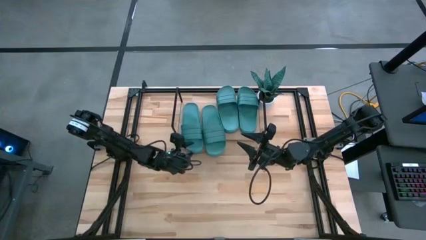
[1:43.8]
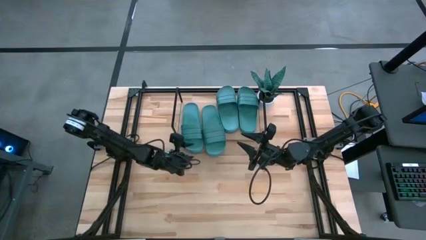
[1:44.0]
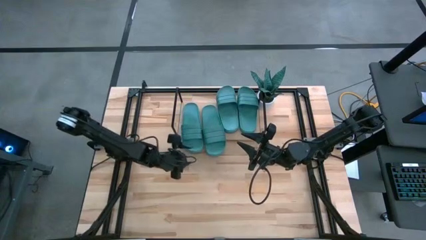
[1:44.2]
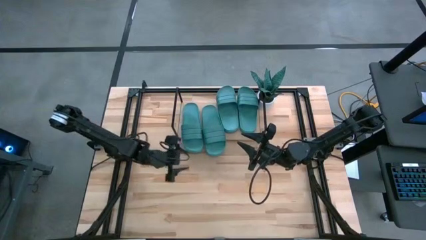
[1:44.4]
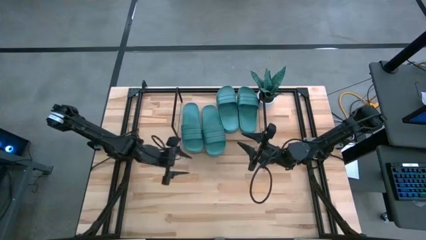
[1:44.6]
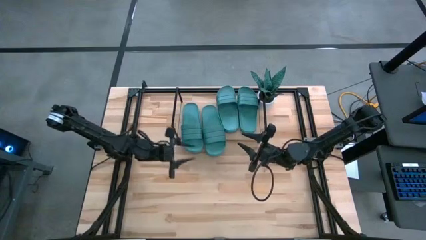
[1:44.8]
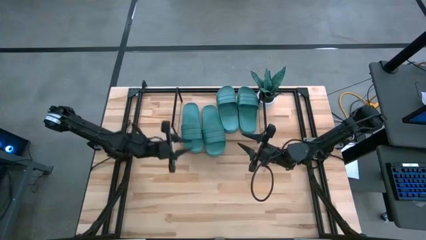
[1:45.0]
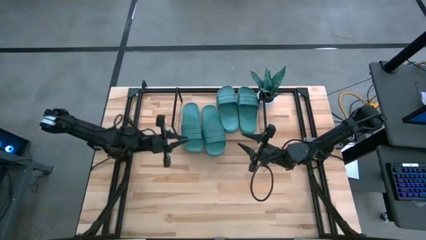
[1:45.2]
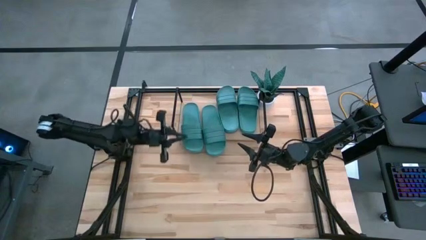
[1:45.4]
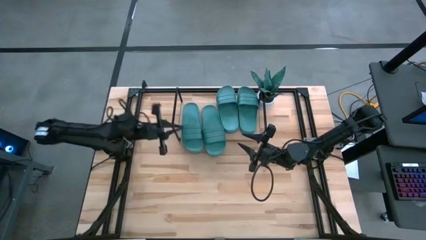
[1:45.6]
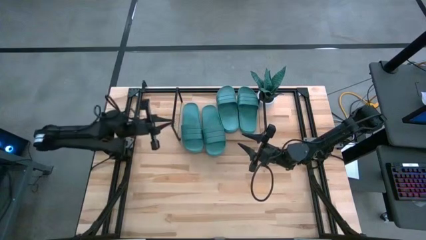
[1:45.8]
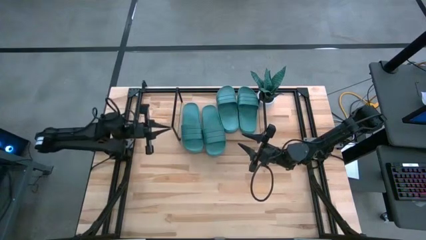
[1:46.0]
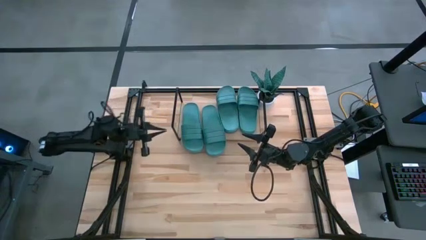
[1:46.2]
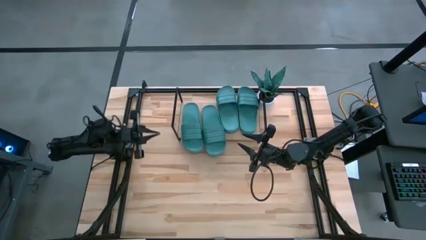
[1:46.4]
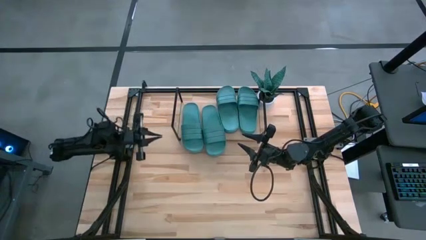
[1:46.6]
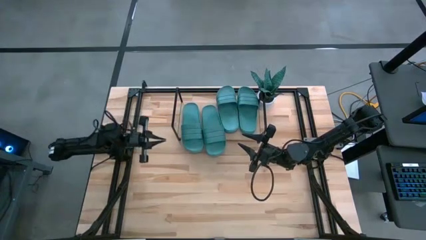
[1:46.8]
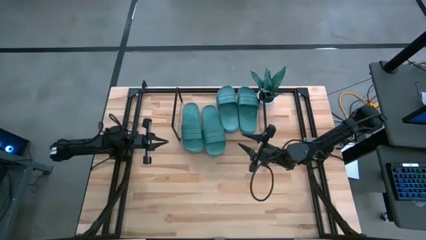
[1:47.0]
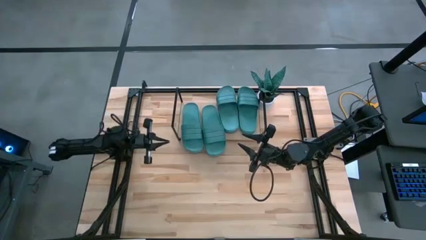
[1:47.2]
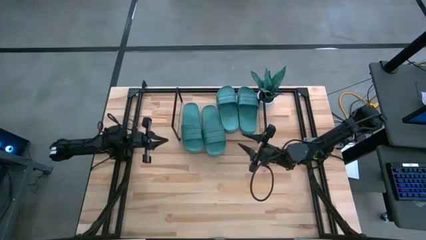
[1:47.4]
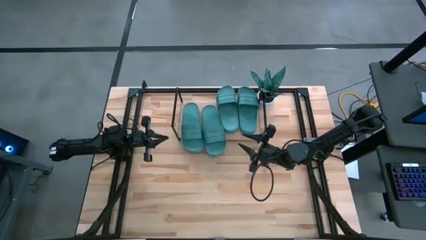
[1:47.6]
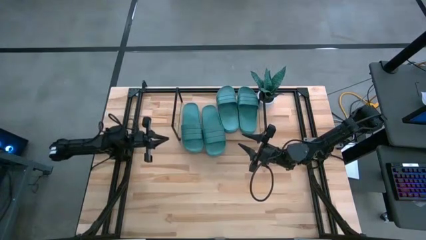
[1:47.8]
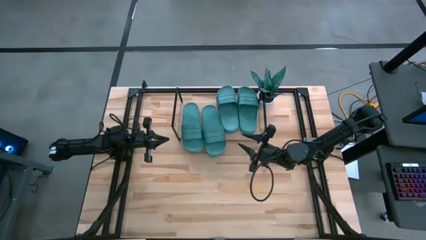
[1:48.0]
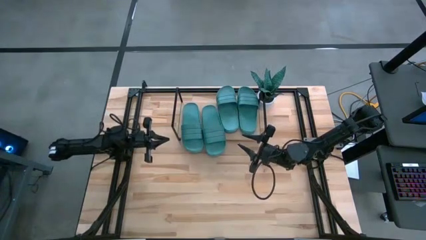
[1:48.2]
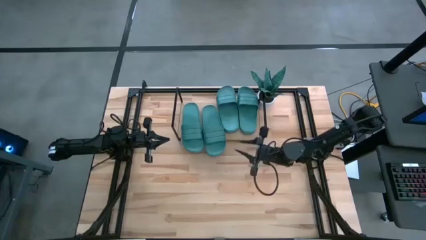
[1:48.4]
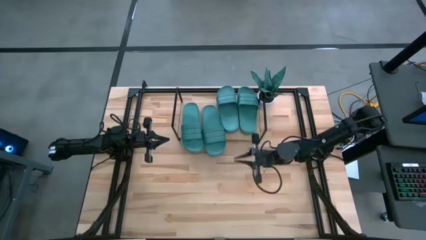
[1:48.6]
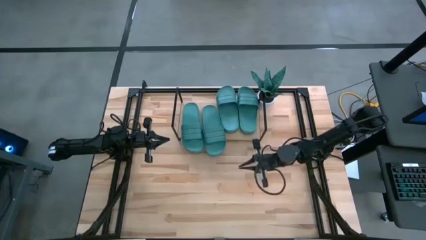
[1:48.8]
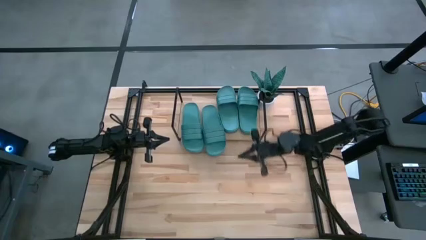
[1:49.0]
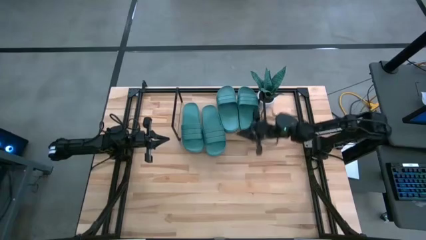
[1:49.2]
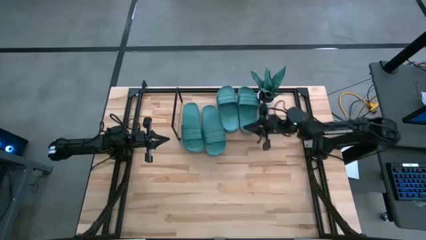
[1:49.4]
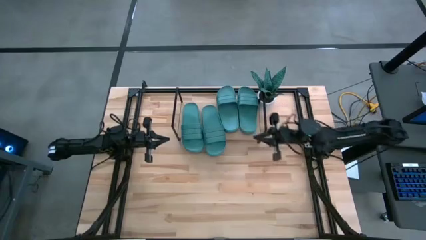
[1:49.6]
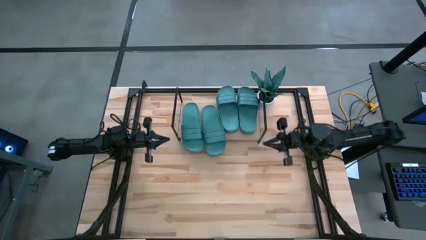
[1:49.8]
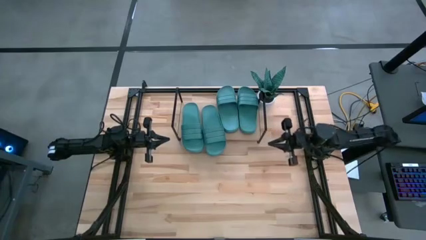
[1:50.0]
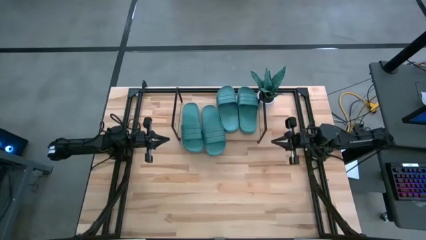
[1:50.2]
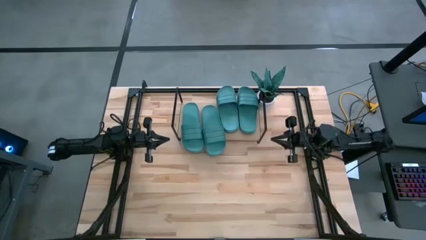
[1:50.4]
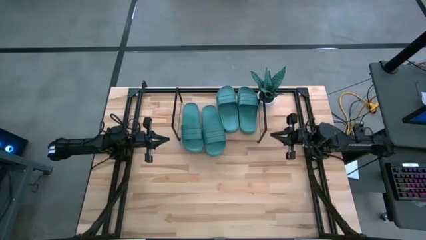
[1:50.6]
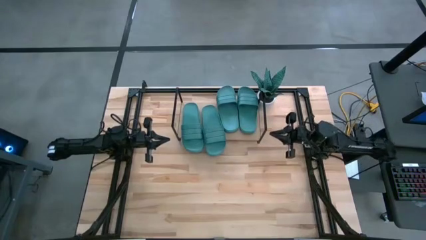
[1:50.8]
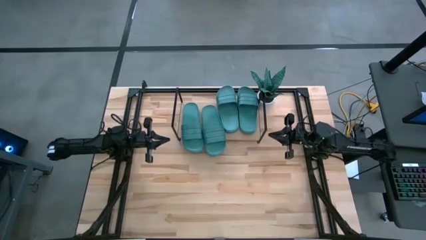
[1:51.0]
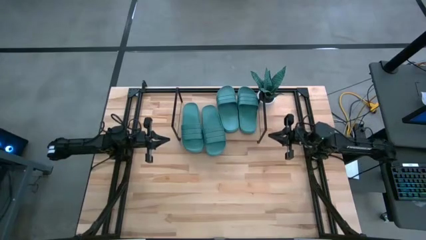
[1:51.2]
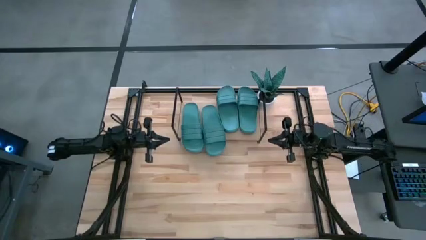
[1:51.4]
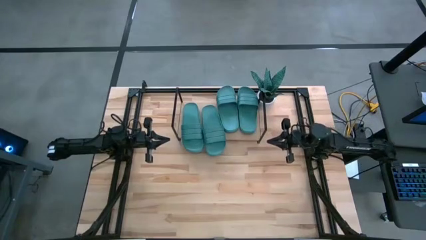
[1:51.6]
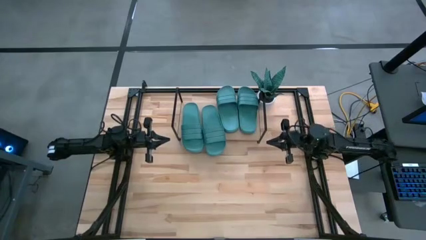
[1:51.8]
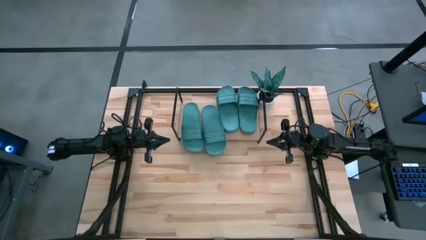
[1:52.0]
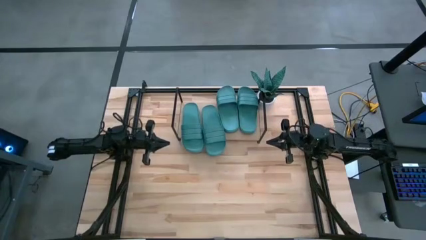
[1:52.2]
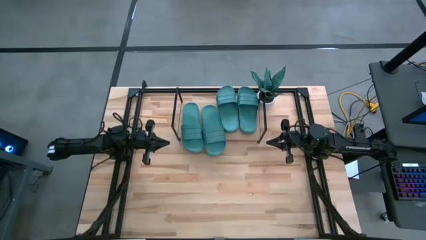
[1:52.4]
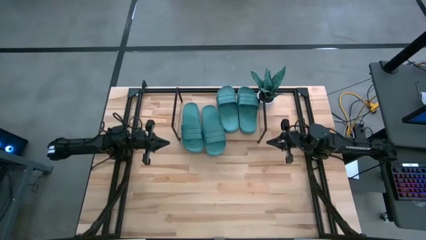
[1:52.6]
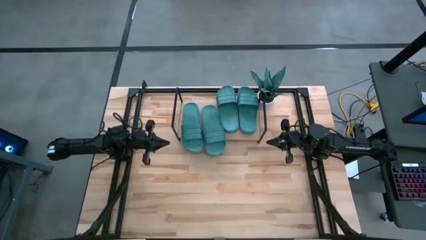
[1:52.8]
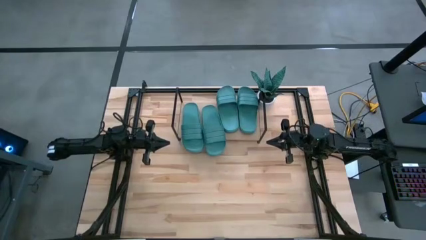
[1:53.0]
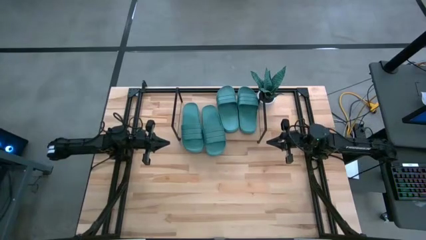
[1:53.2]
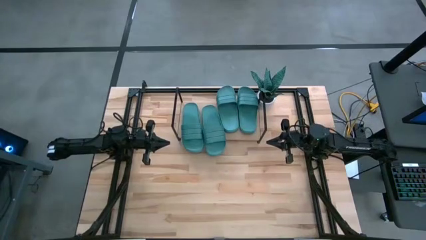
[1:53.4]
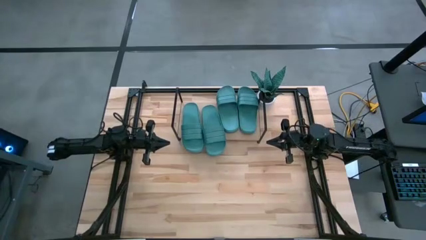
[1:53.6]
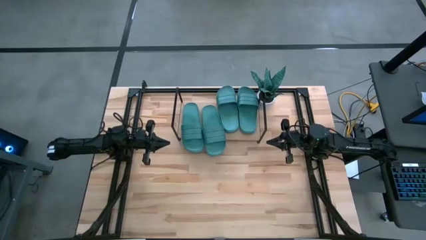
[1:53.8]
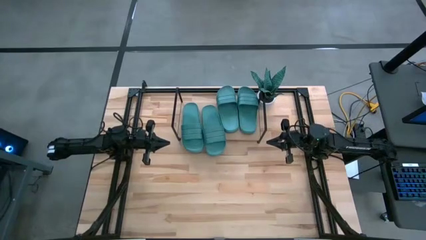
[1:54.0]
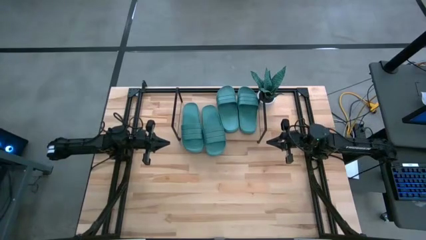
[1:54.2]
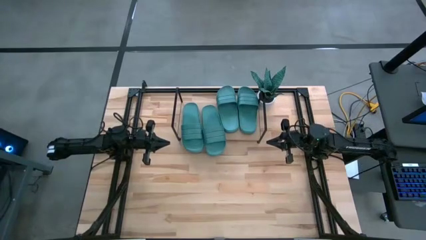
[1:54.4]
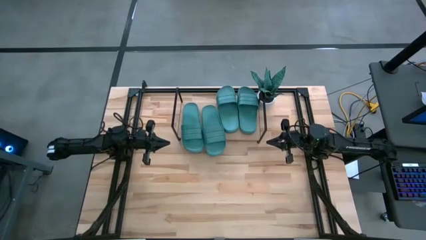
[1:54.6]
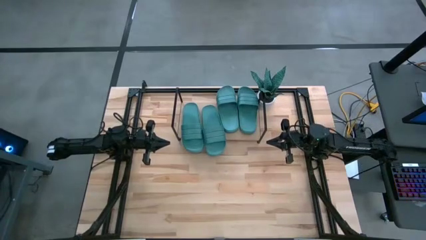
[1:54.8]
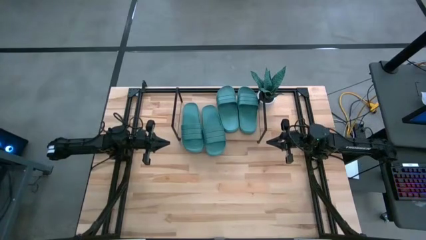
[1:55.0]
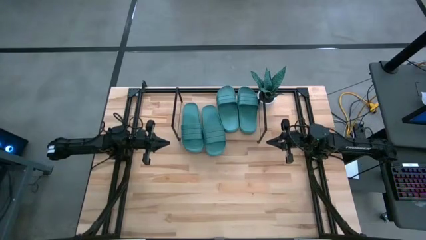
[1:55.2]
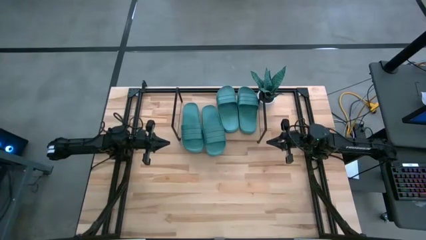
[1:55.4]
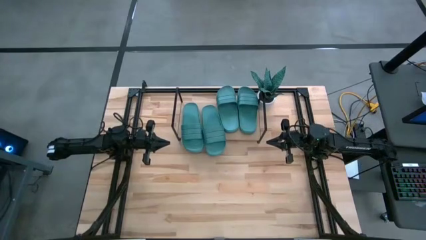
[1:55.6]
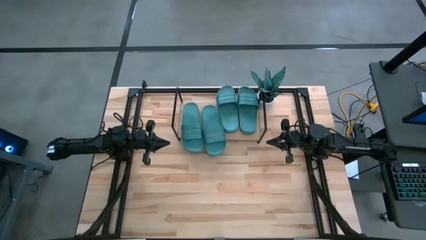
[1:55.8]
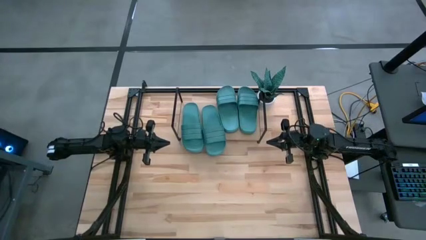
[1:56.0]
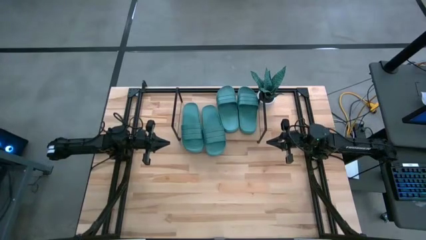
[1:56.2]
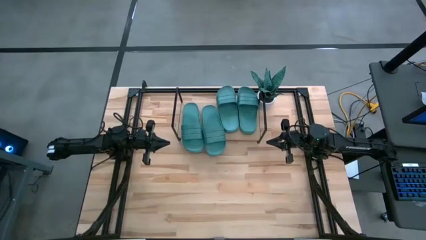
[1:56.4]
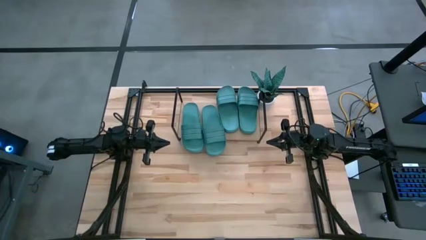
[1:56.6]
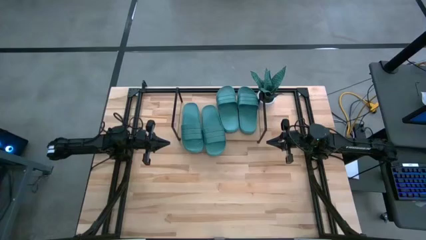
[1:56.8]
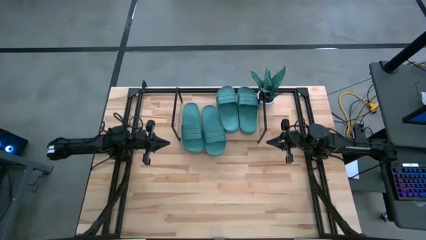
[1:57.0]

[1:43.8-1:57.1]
Task: Pick and place slides into the shelf
Return to Home Position
